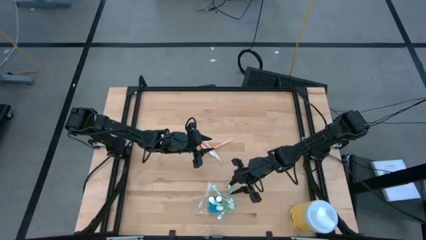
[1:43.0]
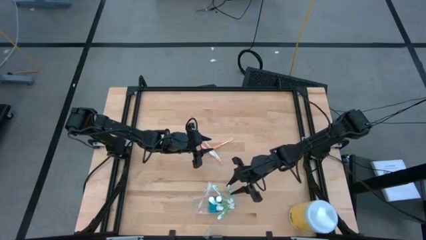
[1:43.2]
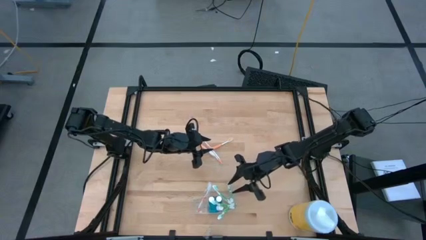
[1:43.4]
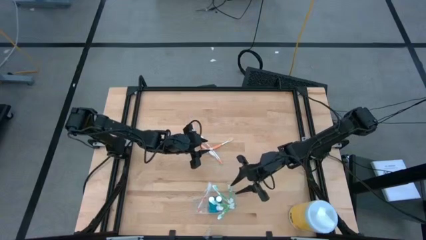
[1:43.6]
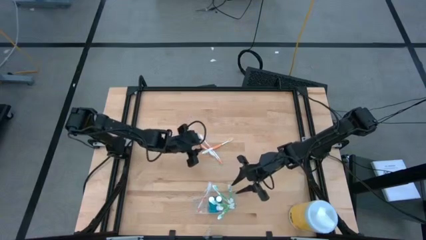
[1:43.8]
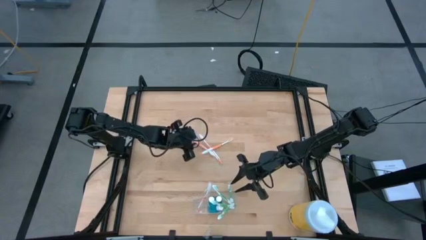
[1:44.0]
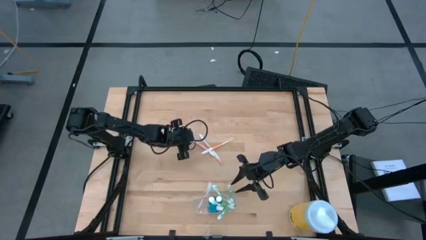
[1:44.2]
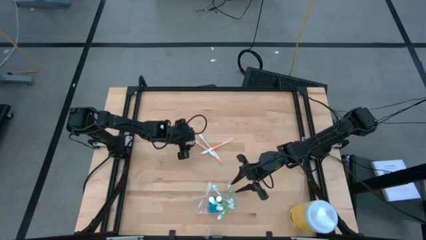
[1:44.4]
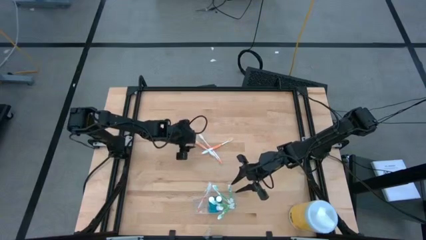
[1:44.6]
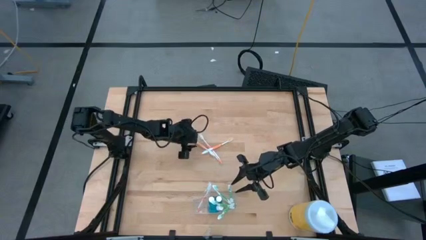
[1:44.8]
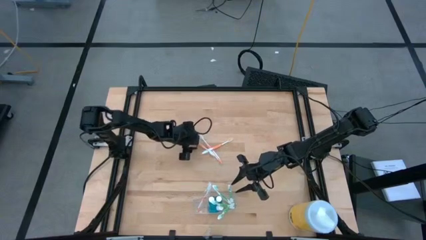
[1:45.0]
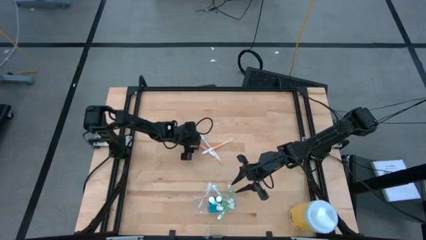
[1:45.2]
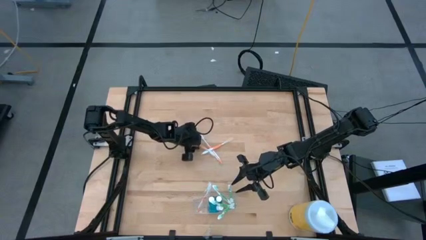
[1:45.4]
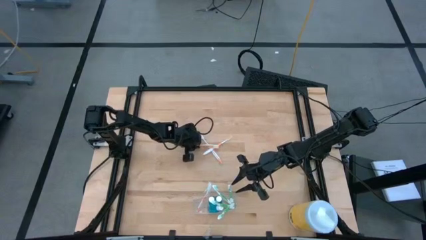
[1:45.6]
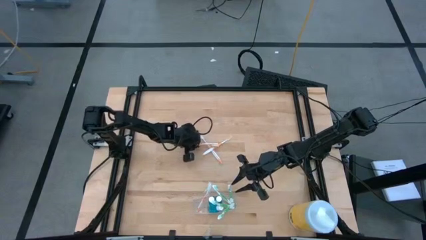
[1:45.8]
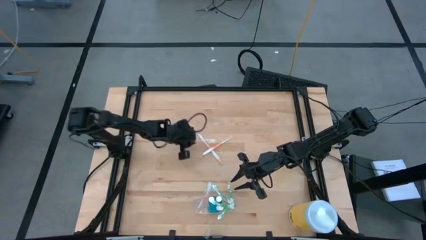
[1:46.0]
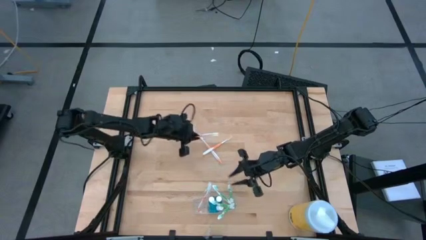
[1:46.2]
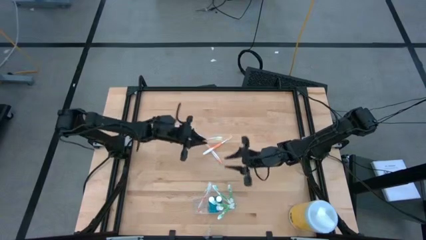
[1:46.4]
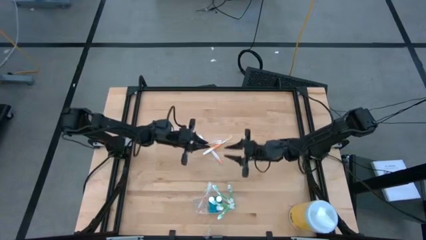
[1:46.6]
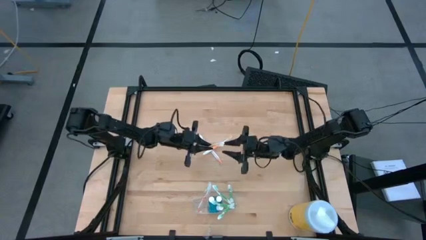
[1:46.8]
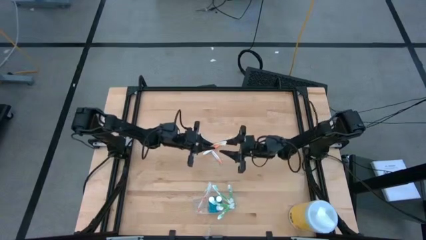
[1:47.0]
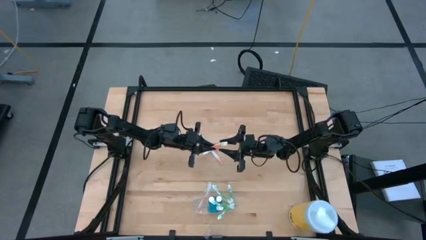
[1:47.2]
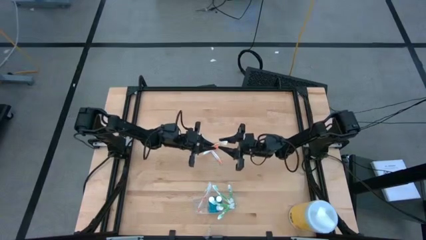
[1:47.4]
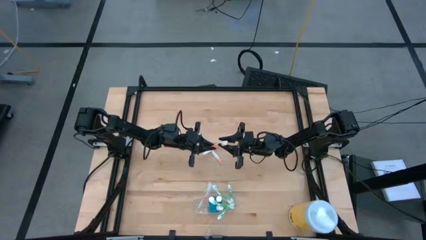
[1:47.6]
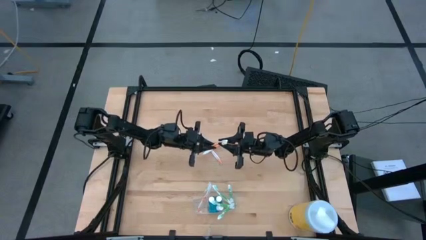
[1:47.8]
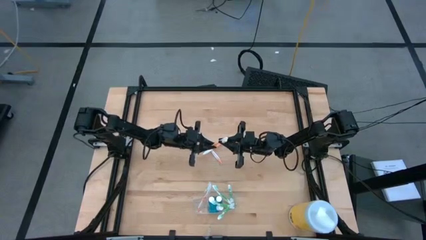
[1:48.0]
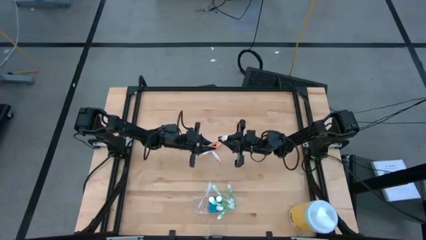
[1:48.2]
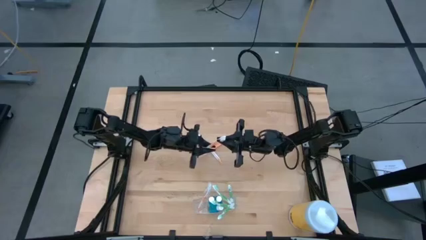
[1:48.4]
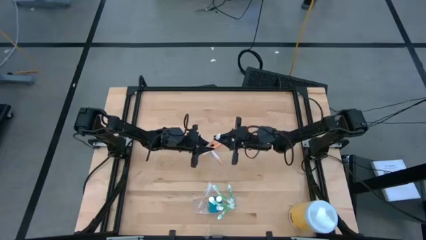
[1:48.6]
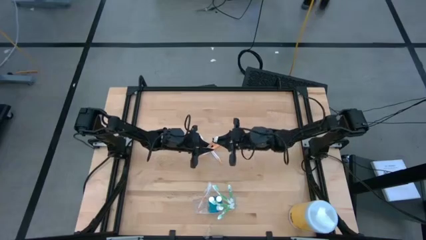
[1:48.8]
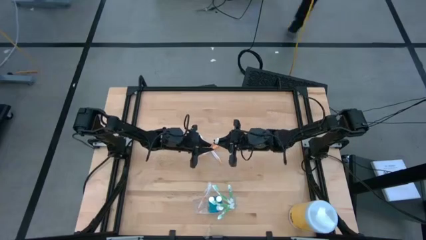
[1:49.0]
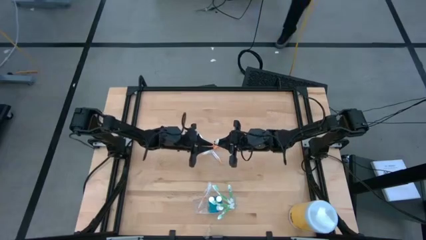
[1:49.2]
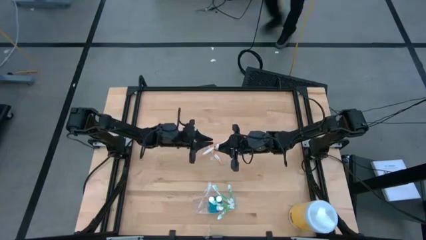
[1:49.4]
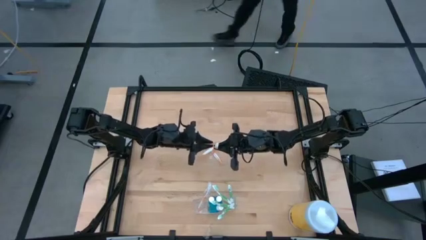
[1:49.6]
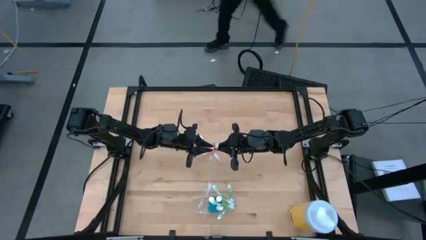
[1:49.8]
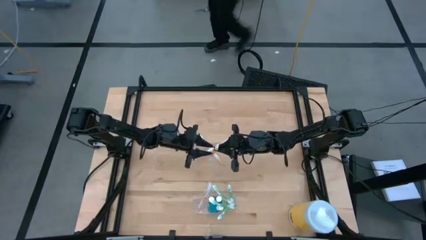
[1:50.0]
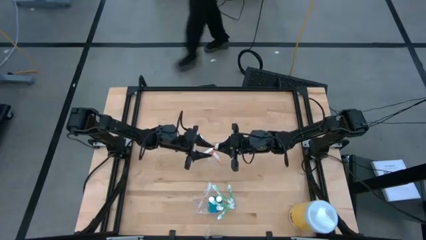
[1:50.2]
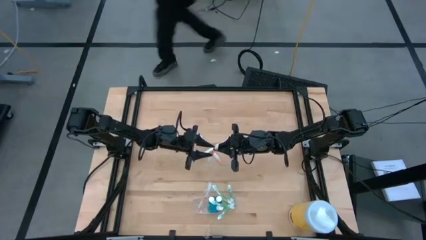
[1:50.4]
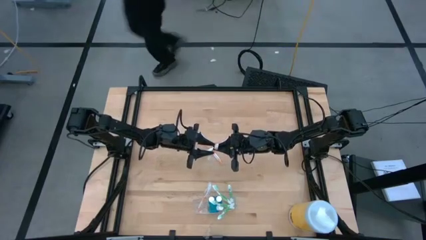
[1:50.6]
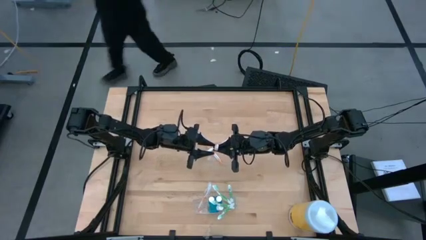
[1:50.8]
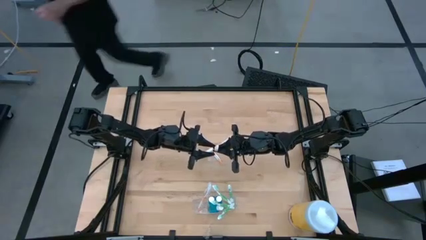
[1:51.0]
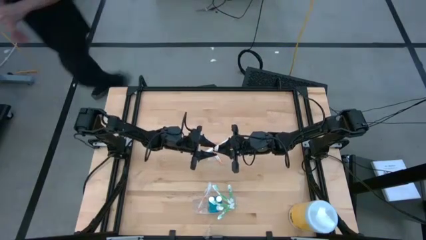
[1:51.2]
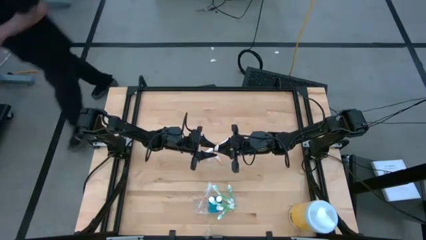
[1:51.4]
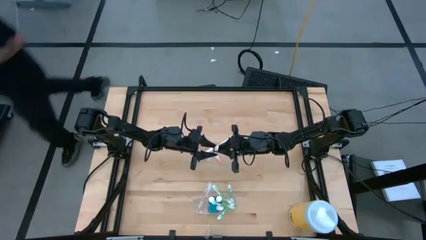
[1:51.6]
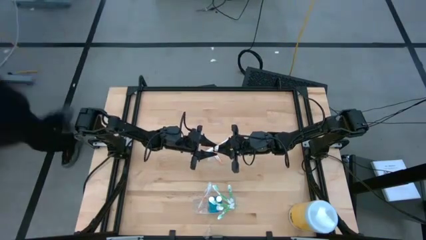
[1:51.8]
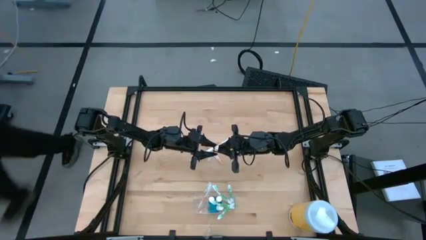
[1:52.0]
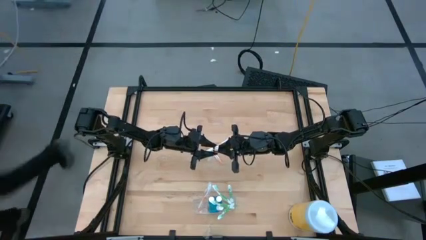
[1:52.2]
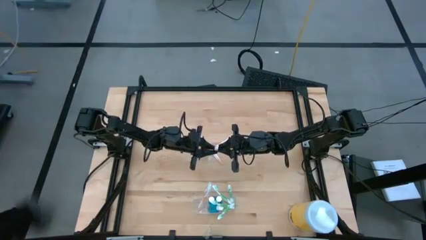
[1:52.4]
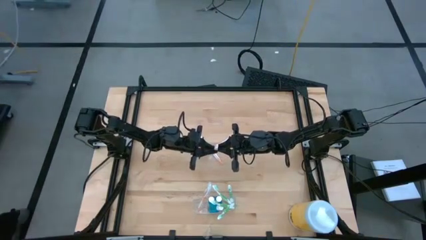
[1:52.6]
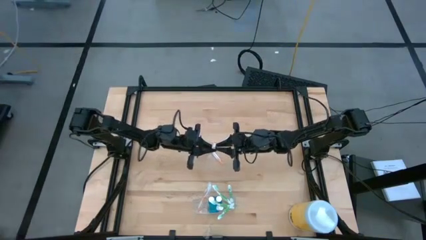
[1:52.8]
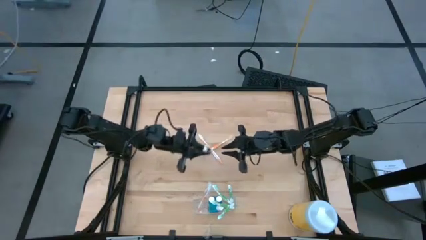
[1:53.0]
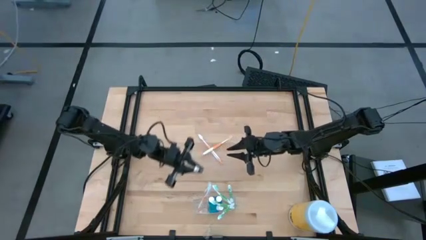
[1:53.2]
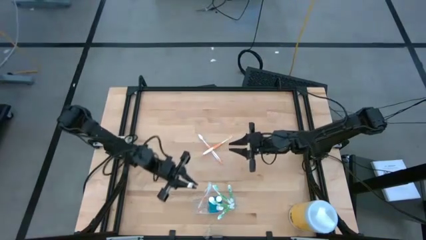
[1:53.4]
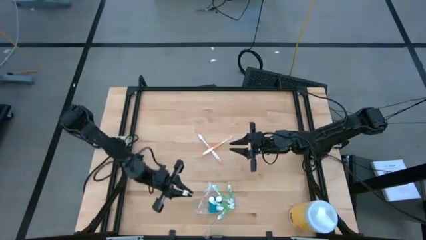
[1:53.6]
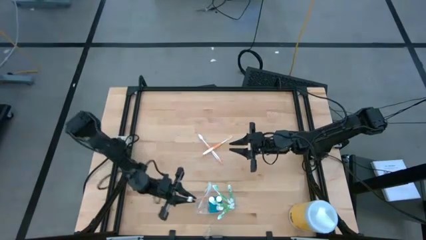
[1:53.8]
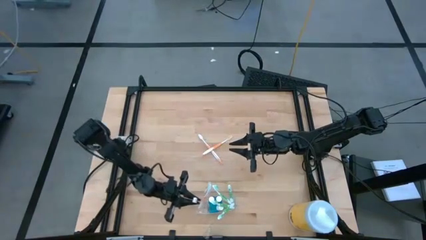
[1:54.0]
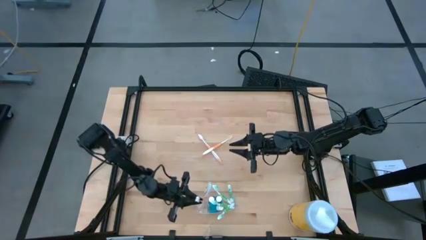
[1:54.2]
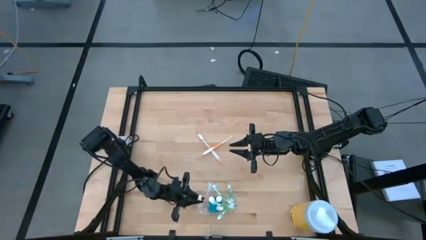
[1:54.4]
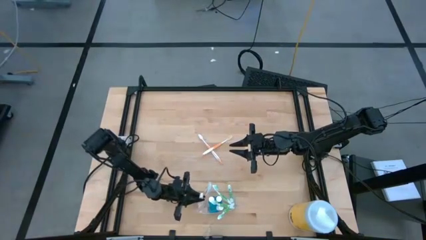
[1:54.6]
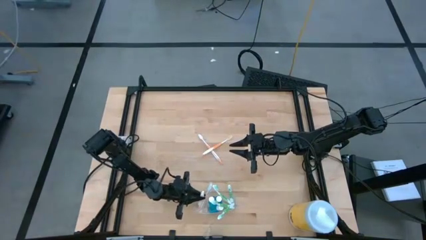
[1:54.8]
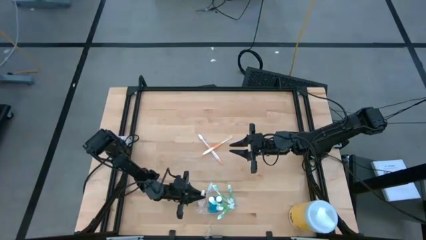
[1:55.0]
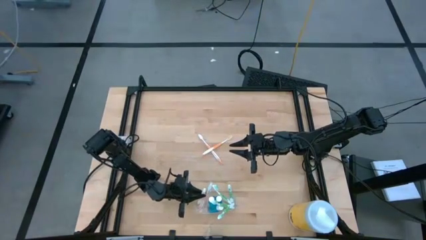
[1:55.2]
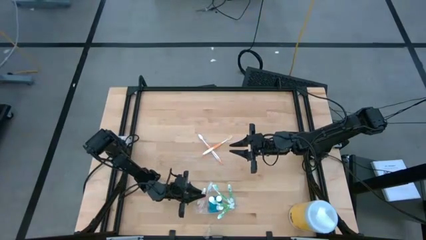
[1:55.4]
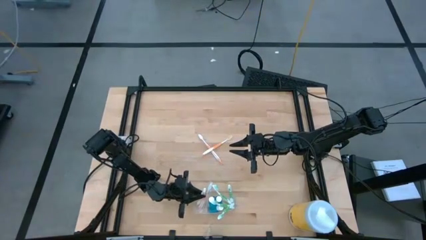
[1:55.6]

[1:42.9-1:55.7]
Task: Pick & Place toothbrushing station
Put the orange toothbrush into the transparent organizer
